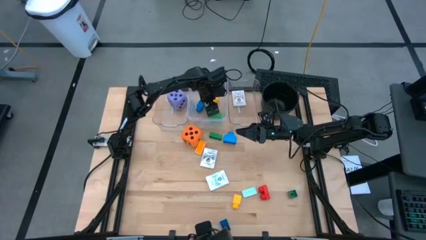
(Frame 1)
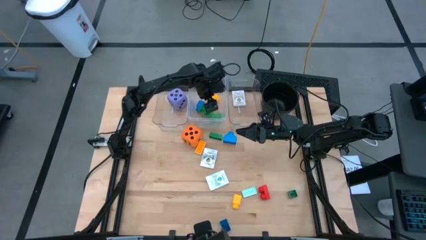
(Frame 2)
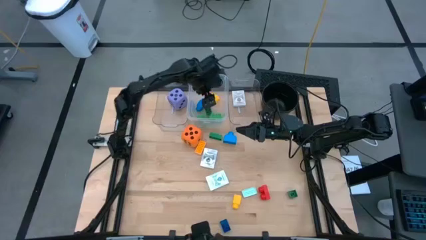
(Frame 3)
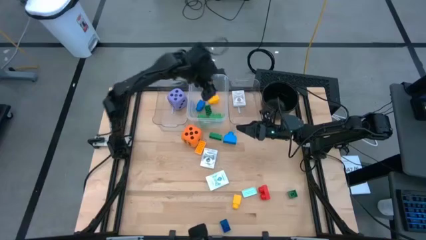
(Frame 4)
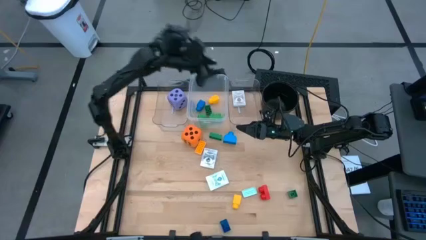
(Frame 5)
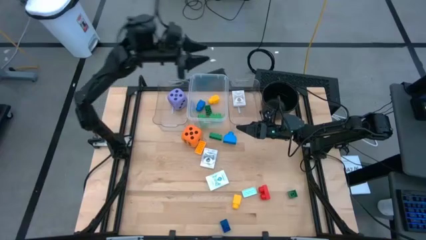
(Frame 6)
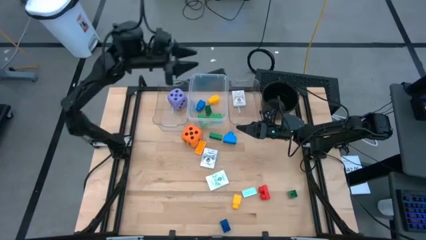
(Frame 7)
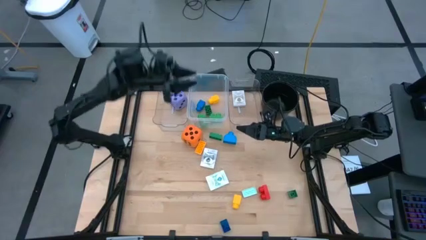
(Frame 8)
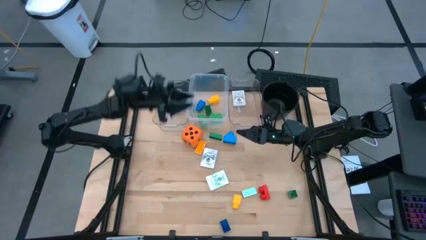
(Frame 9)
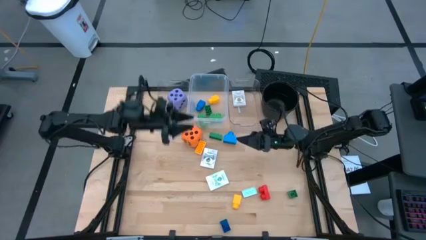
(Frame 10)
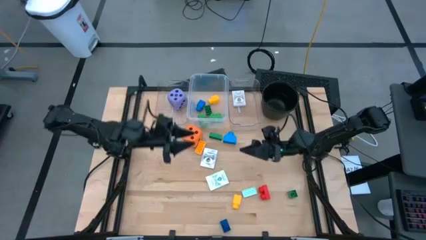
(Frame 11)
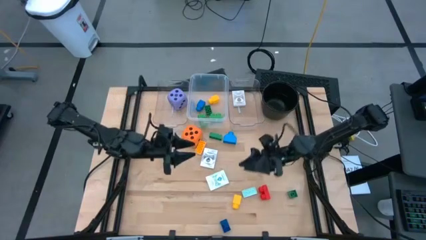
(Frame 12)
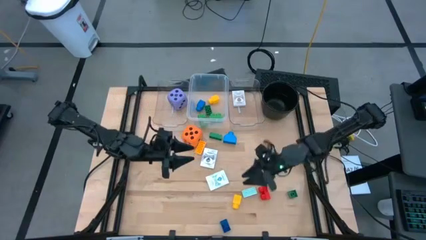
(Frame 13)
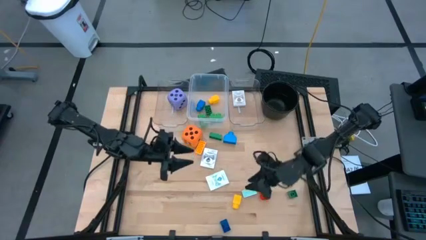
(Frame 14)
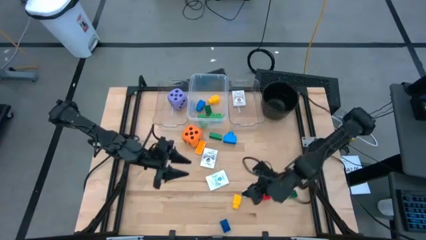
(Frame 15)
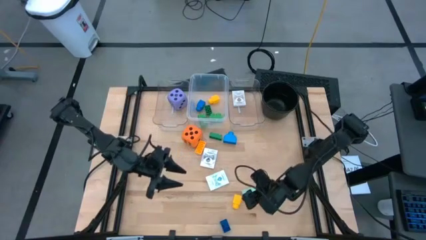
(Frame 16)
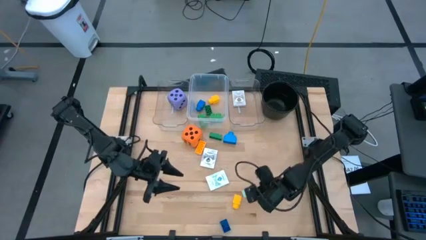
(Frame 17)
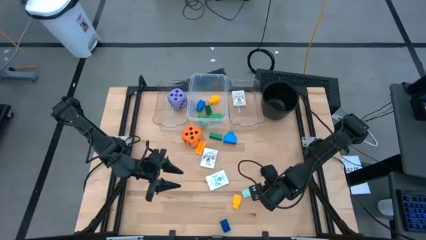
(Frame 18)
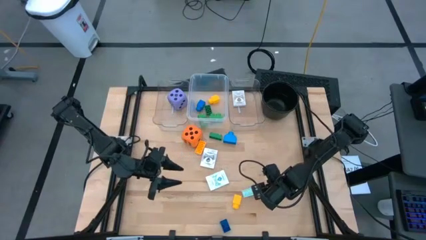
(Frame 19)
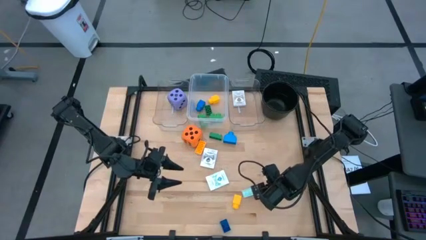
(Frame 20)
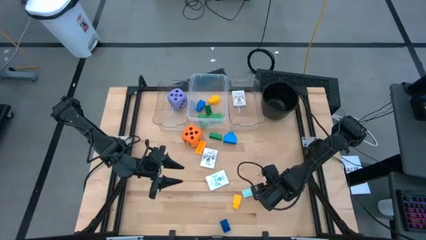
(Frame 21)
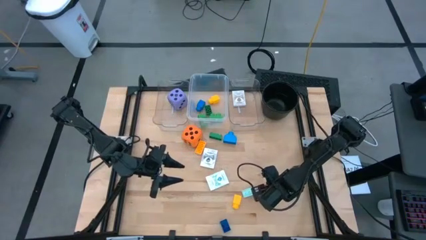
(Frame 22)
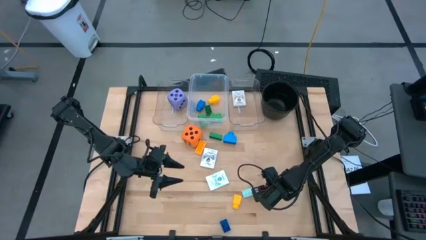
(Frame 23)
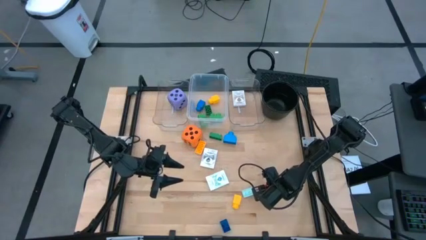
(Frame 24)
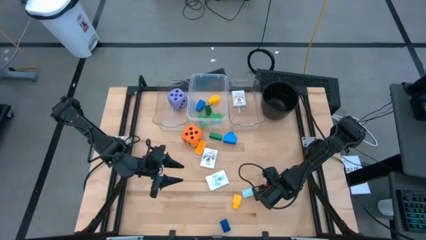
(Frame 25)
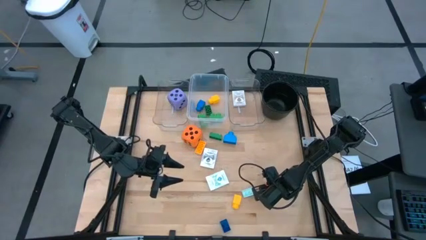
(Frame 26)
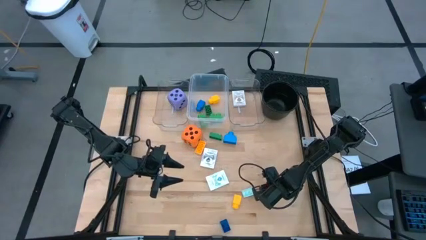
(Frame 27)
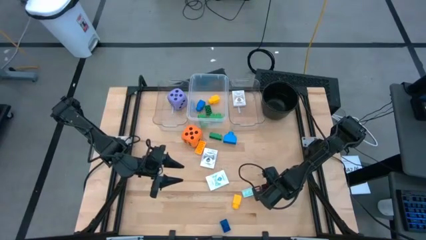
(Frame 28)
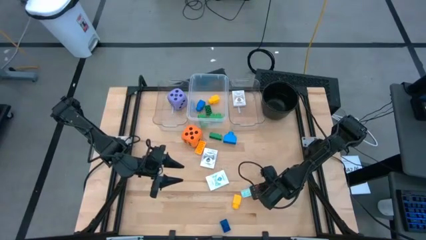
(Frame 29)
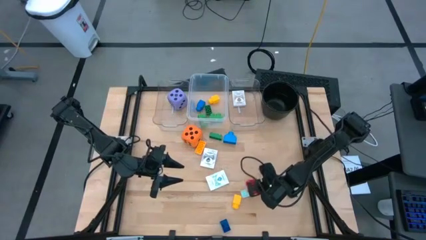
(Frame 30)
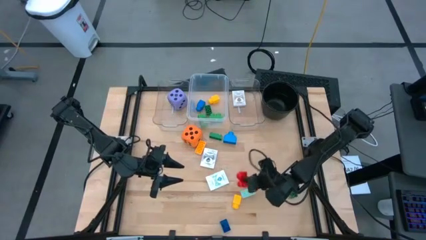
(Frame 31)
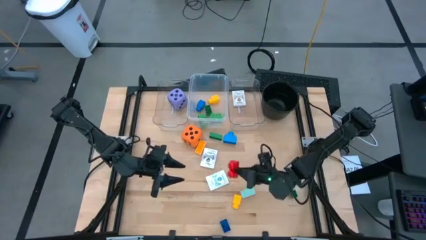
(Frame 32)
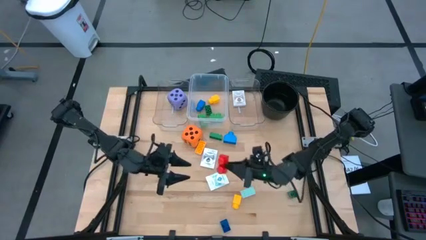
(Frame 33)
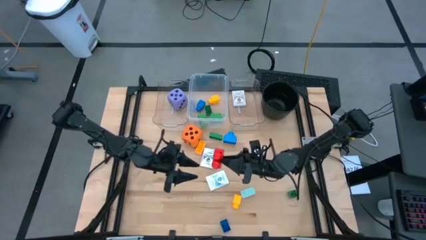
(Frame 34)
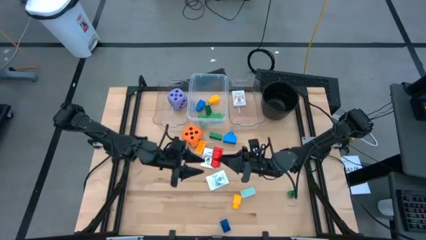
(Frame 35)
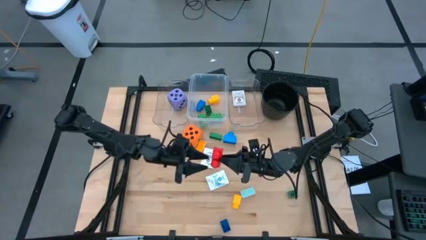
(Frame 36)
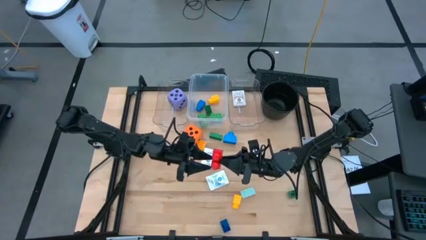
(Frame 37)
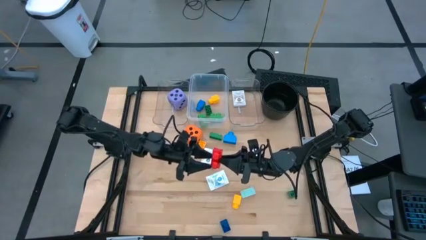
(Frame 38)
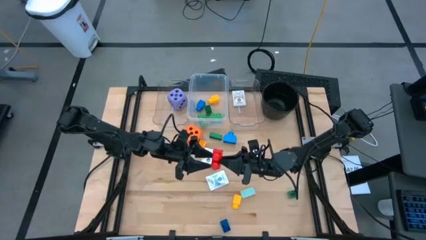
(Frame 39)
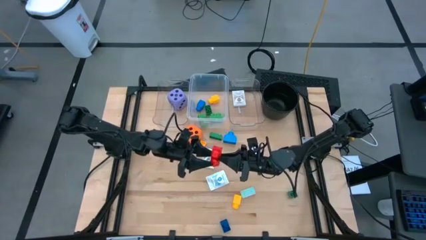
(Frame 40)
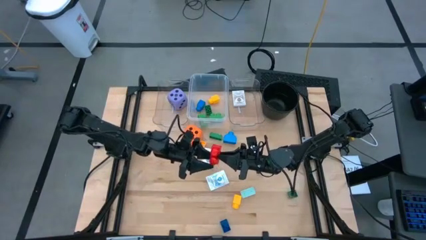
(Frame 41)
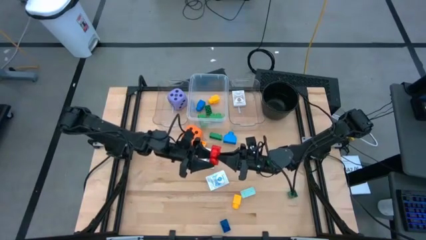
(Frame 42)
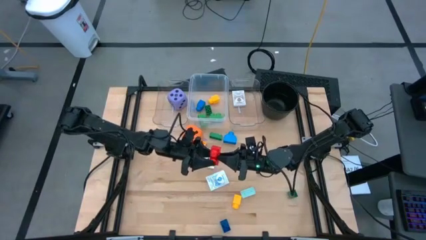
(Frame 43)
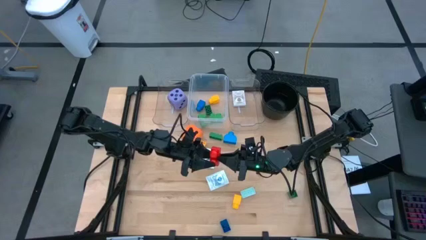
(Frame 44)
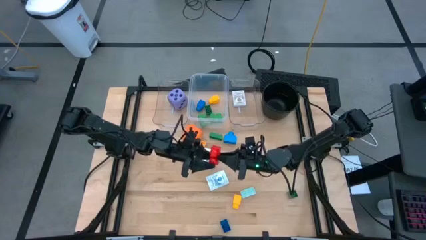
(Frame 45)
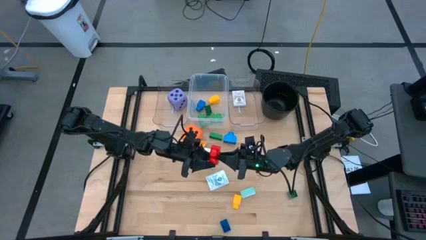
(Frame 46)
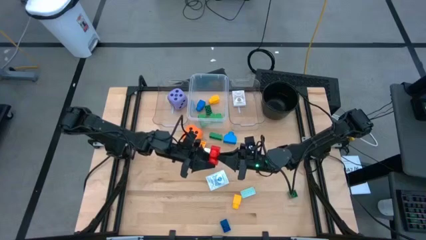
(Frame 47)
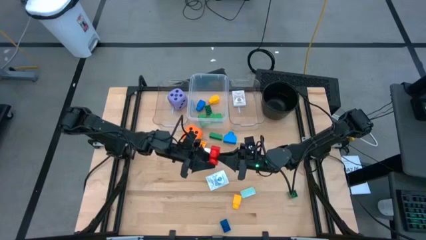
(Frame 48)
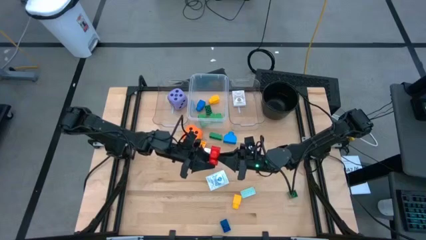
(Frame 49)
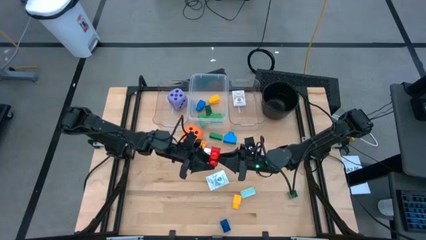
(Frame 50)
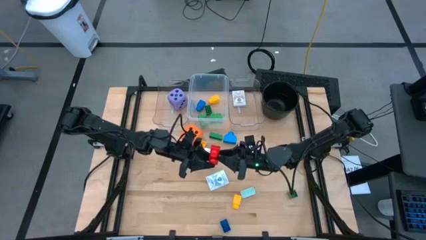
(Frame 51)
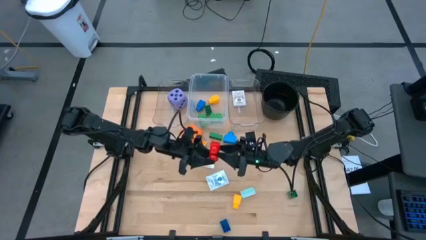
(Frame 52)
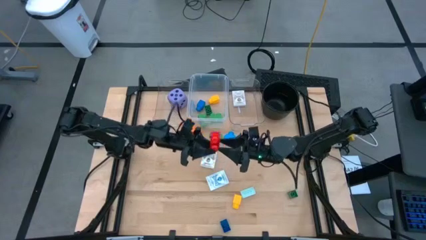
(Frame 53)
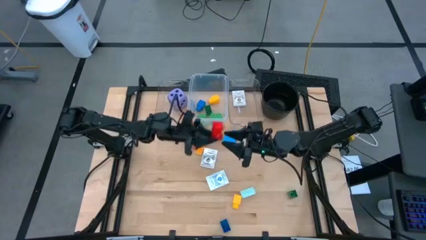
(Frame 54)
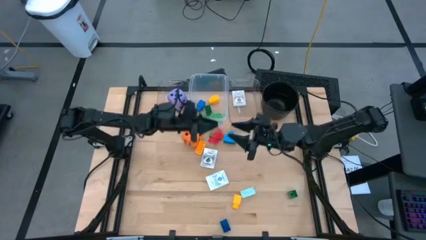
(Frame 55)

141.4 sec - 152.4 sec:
Task: Pick & Place Toys
Put the red two stud game piece into the middle transparent bin

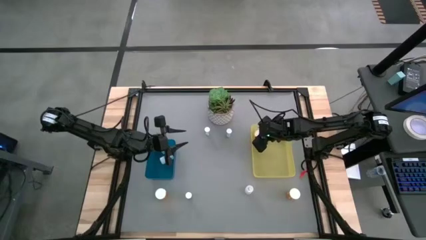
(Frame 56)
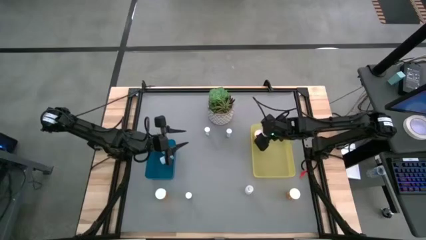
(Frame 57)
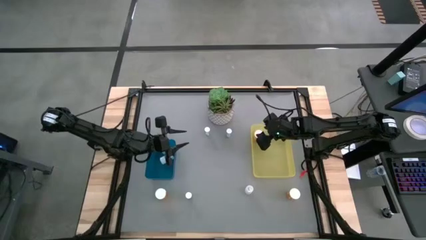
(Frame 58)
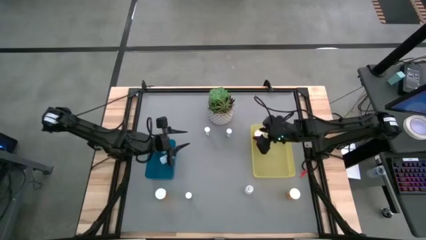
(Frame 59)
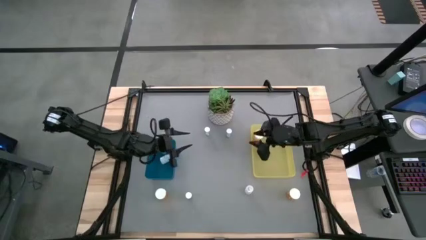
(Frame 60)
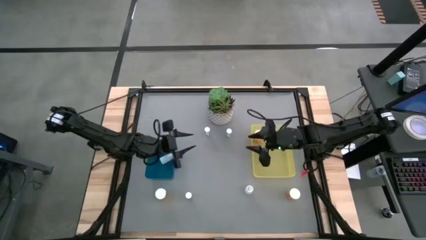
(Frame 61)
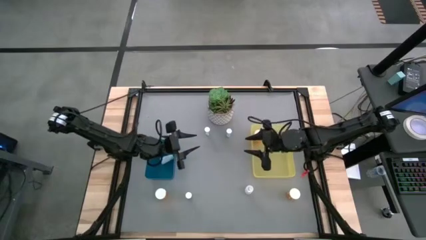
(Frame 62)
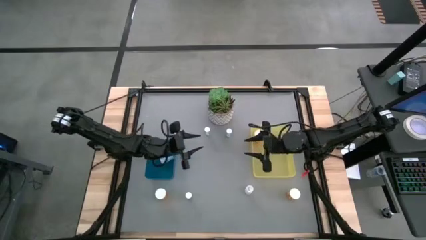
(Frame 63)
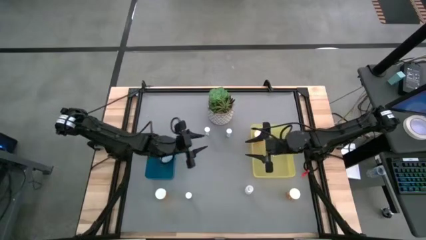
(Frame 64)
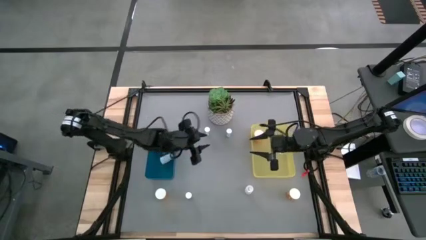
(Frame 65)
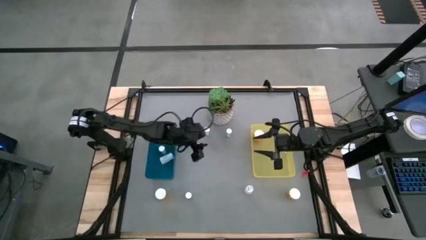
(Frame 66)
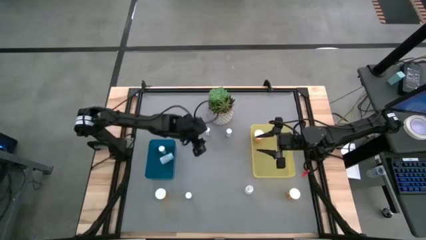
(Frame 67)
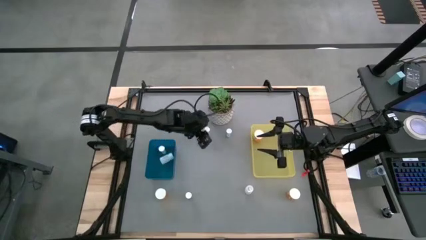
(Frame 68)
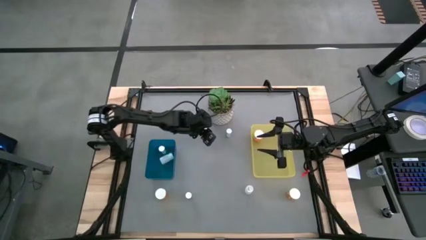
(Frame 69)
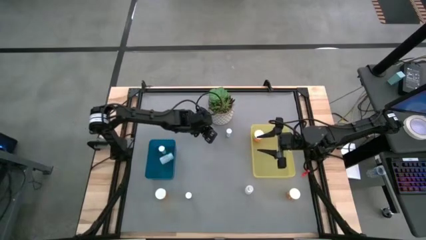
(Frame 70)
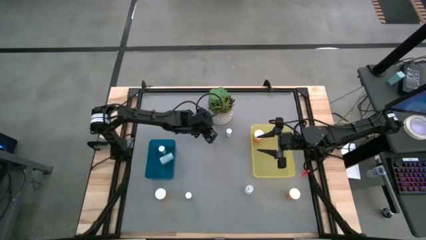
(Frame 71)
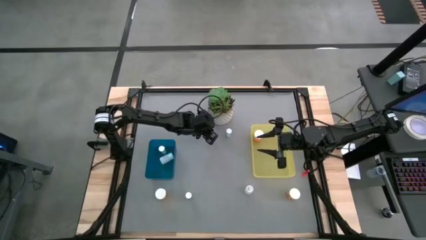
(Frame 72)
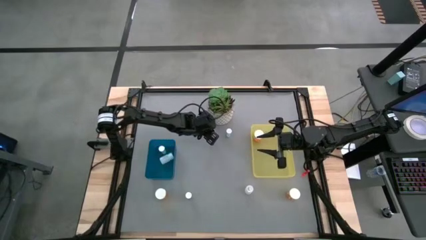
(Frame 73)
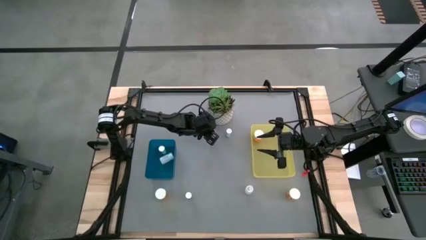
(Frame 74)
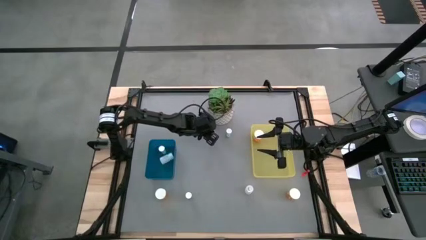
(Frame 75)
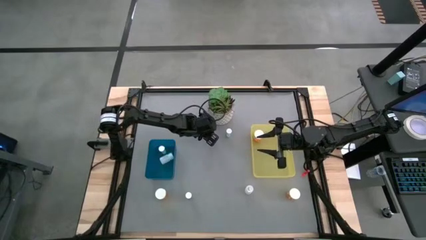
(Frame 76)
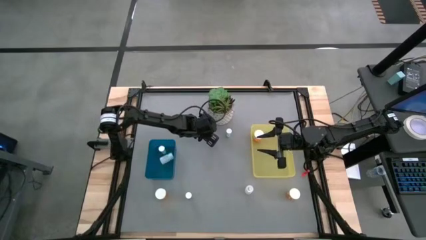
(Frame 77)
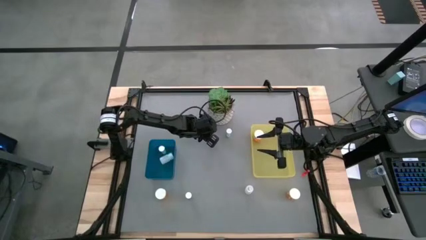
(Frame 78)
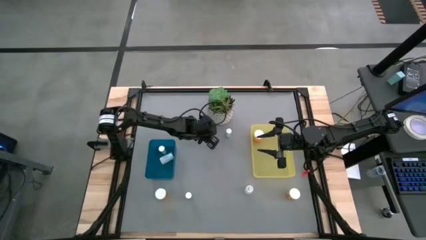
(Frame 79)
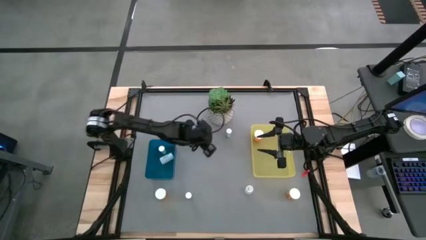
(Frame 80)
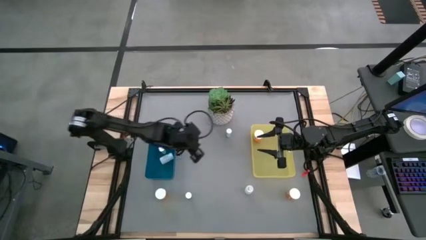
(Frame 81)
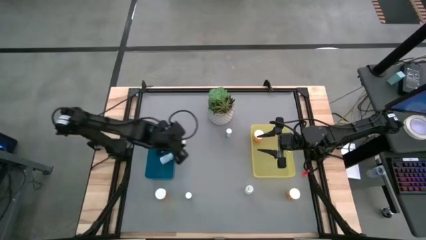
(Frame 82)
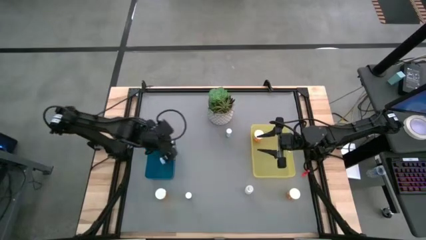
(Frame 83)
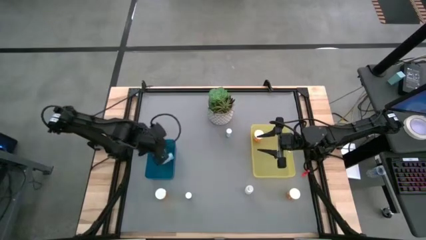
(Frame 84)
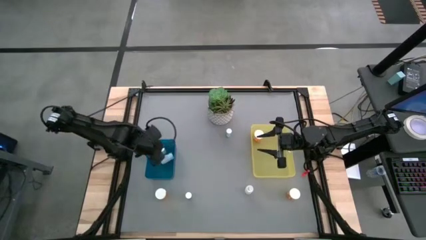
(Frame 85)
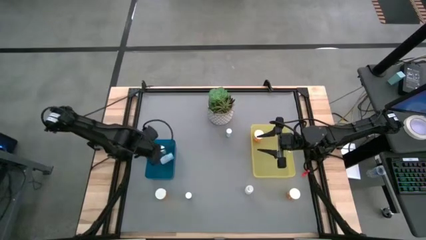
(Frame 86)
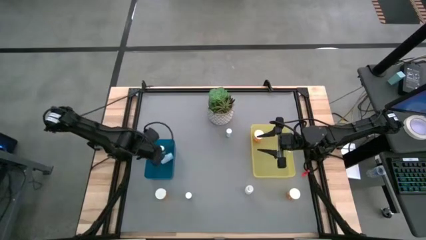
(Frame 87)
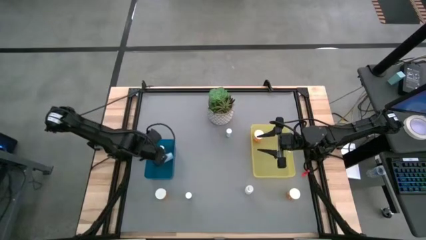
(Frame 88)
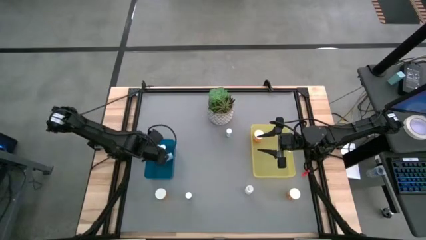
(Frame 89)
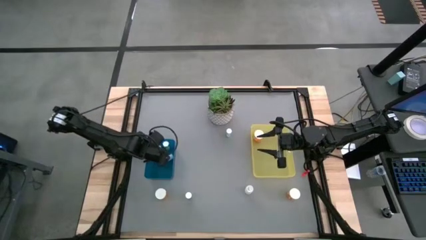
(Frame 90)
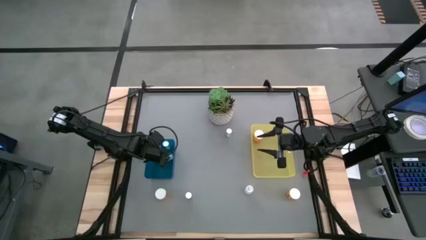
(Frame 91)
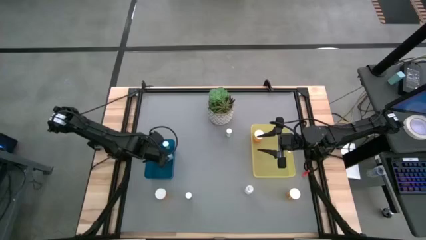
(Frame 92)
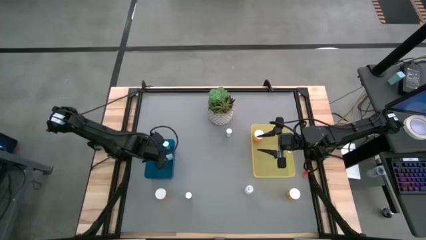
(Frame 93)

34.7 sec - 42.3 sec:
Task: Pick and place medicine bottles into bin by pill shape (circle, oval)
Put the left blue tablet bottle into the left blue bin
